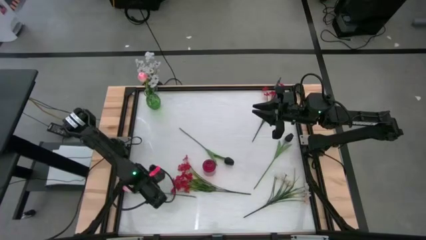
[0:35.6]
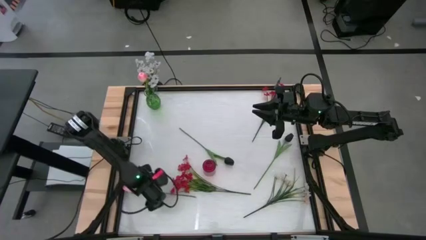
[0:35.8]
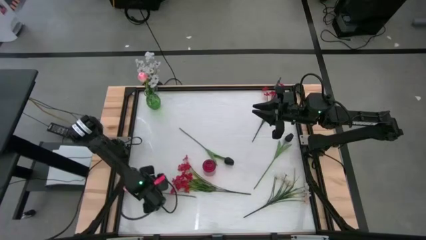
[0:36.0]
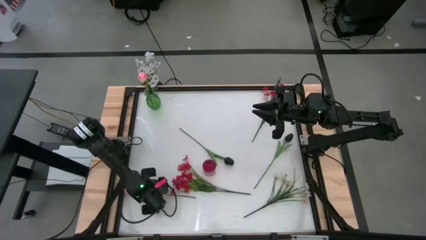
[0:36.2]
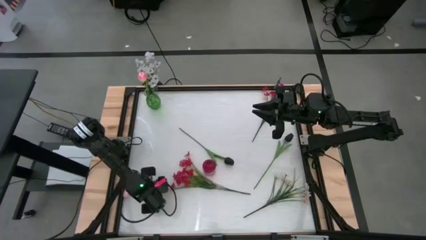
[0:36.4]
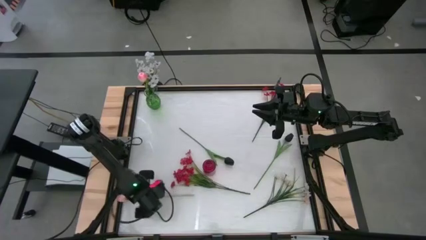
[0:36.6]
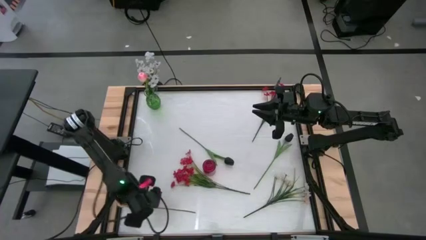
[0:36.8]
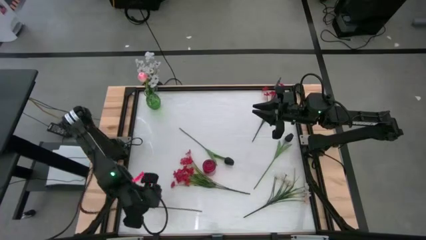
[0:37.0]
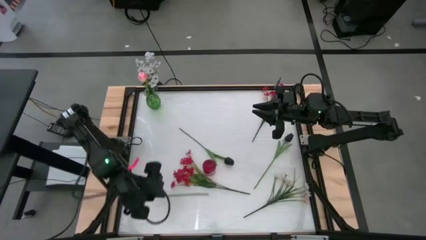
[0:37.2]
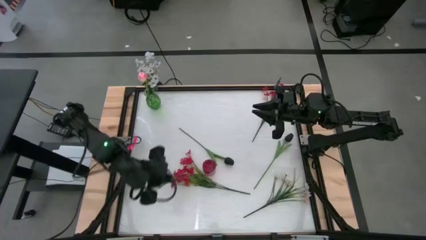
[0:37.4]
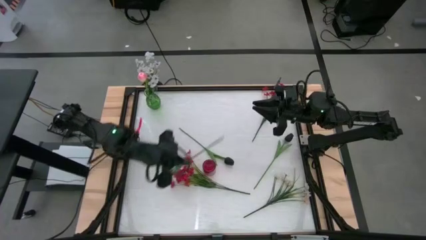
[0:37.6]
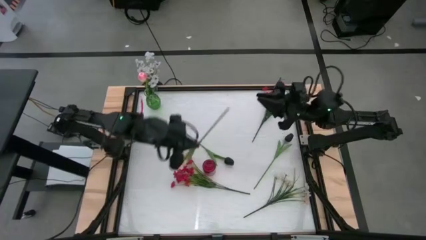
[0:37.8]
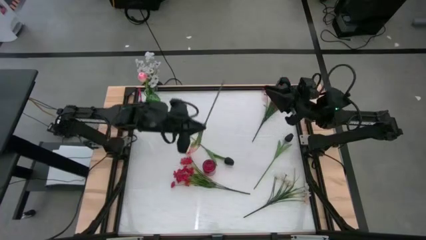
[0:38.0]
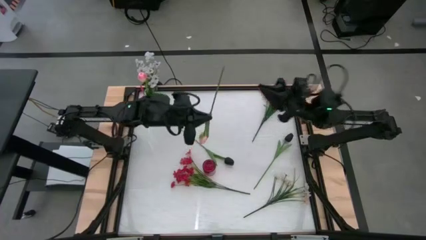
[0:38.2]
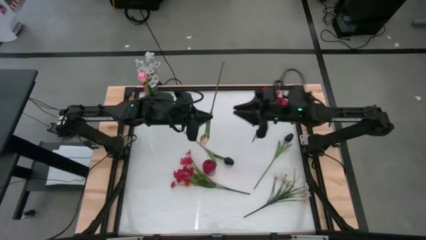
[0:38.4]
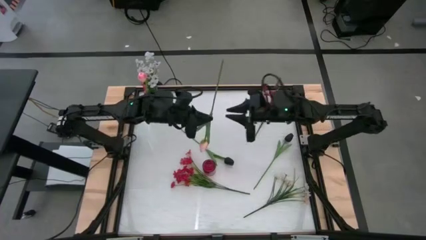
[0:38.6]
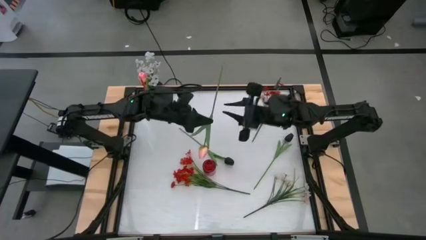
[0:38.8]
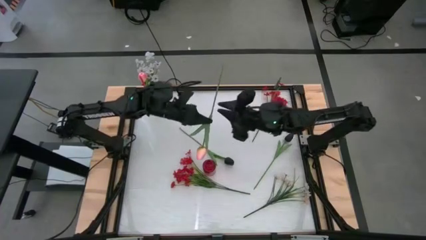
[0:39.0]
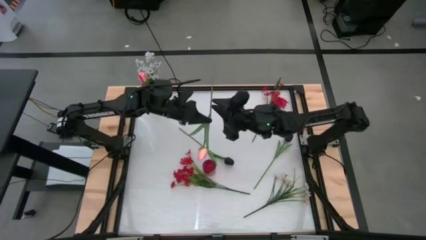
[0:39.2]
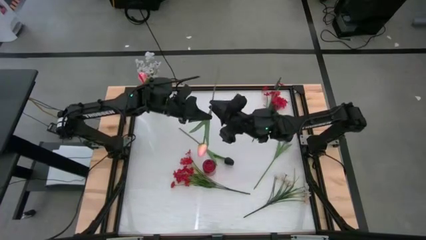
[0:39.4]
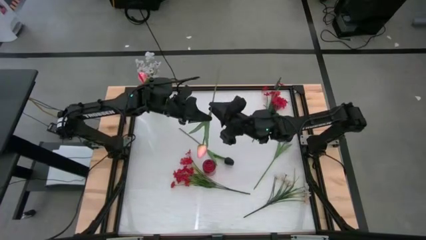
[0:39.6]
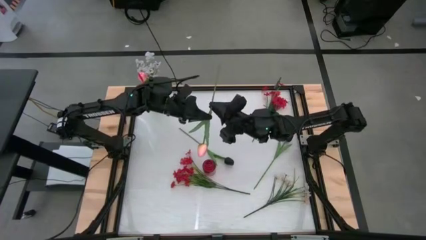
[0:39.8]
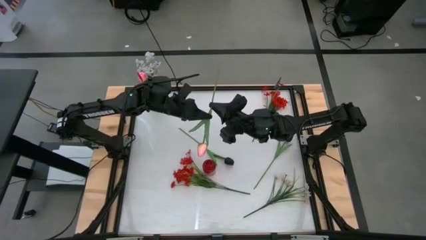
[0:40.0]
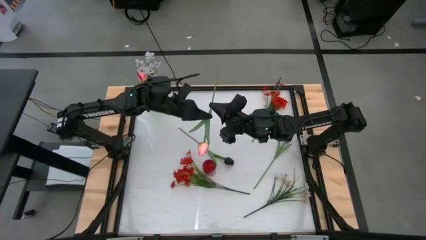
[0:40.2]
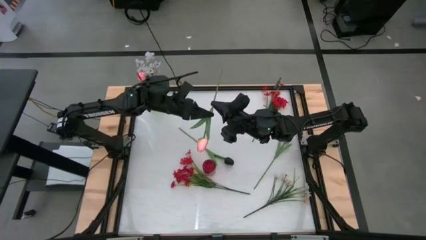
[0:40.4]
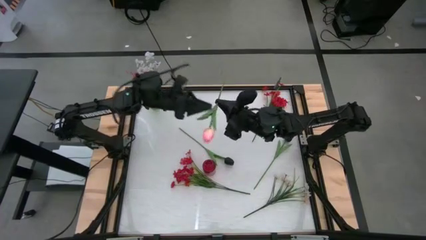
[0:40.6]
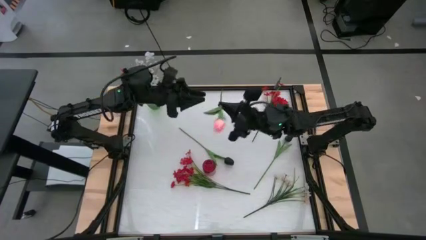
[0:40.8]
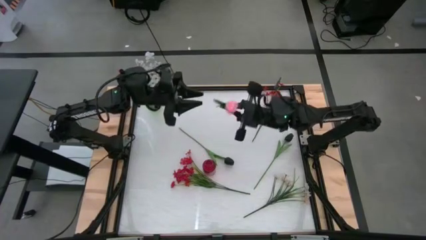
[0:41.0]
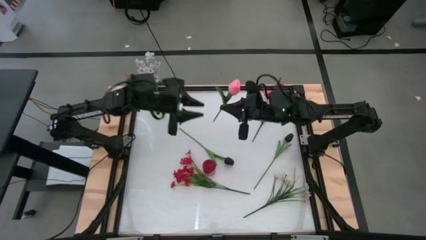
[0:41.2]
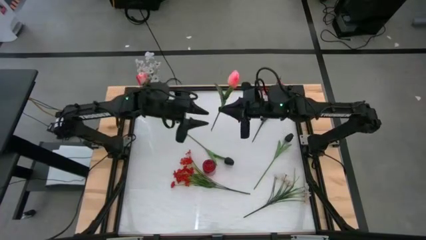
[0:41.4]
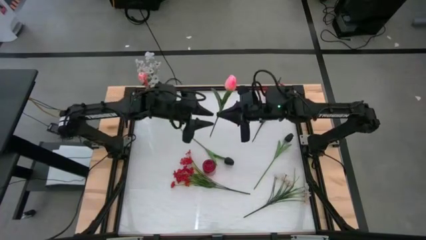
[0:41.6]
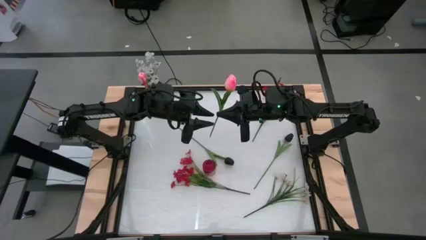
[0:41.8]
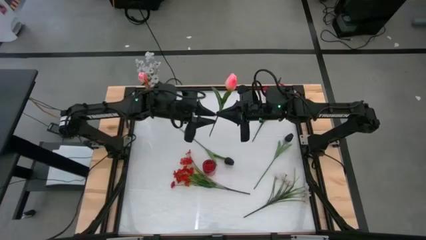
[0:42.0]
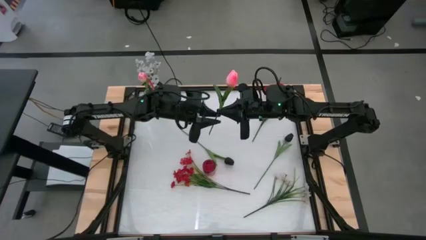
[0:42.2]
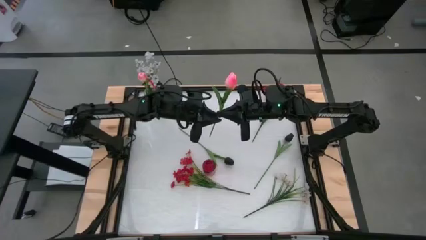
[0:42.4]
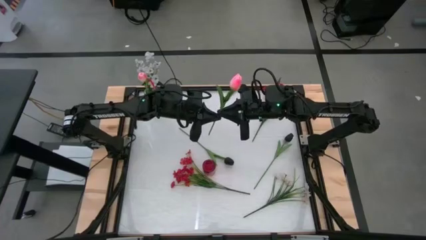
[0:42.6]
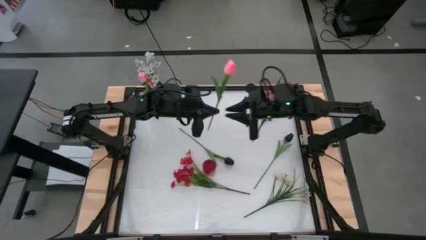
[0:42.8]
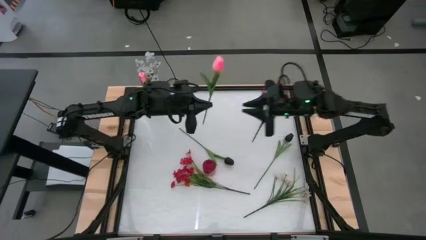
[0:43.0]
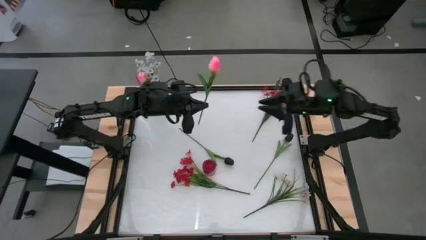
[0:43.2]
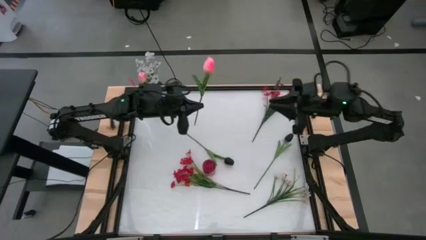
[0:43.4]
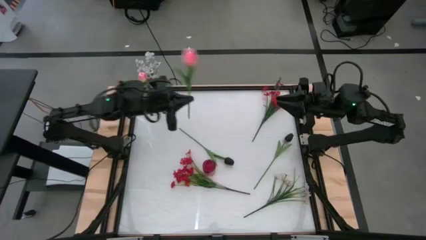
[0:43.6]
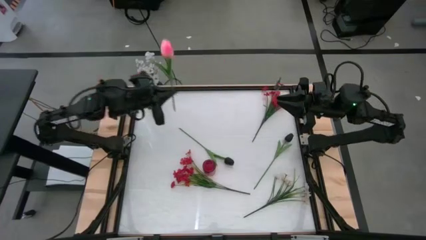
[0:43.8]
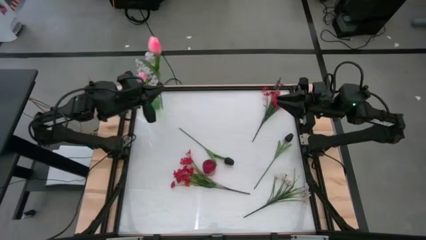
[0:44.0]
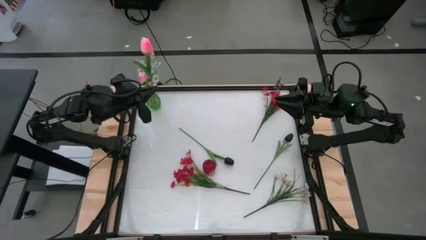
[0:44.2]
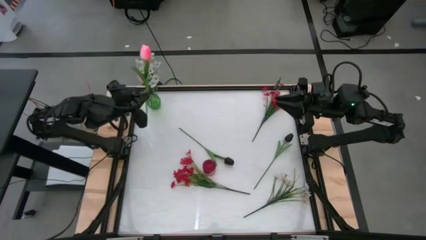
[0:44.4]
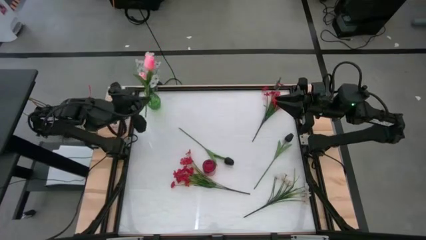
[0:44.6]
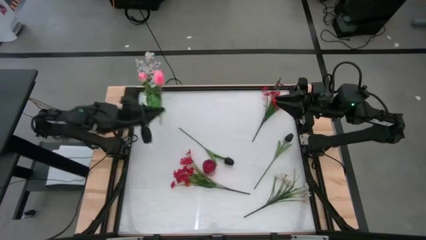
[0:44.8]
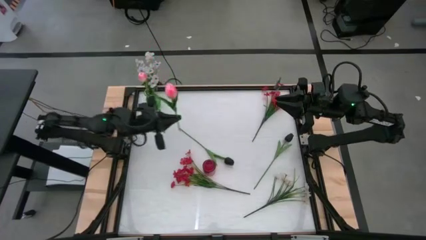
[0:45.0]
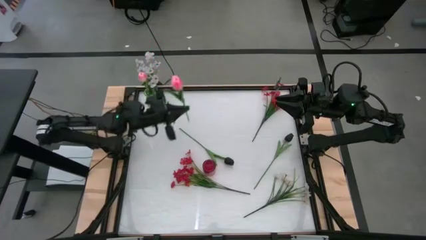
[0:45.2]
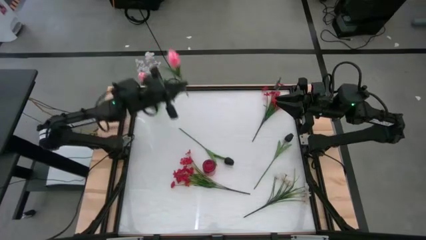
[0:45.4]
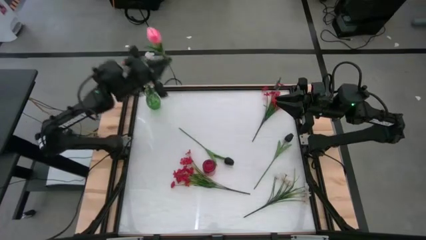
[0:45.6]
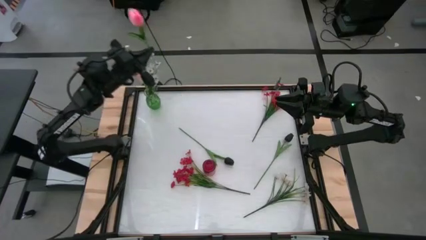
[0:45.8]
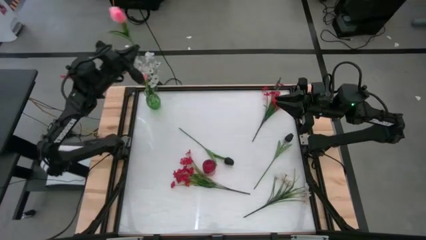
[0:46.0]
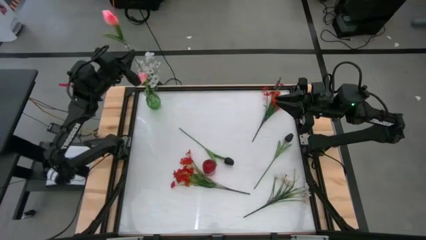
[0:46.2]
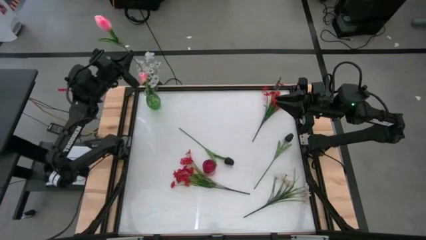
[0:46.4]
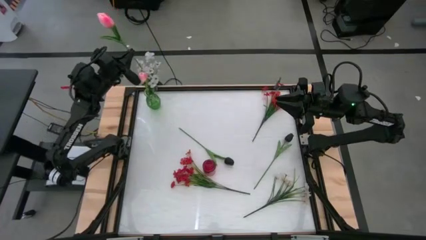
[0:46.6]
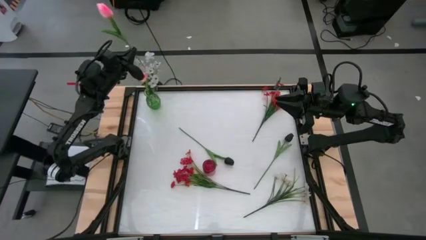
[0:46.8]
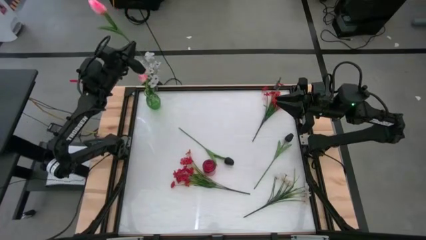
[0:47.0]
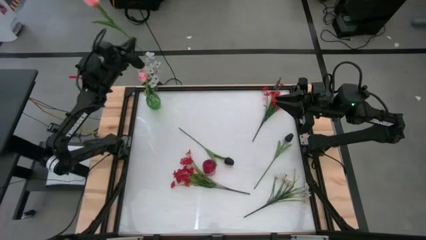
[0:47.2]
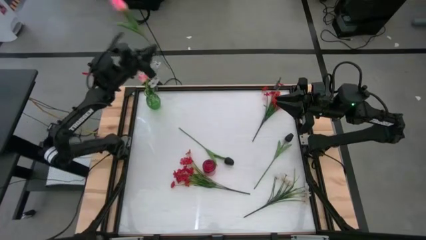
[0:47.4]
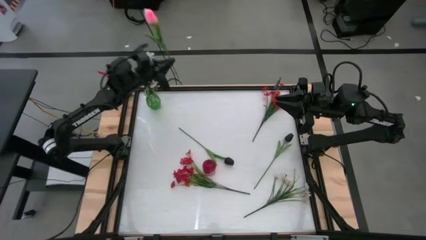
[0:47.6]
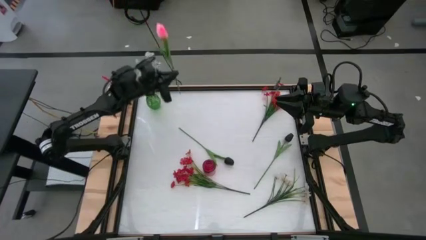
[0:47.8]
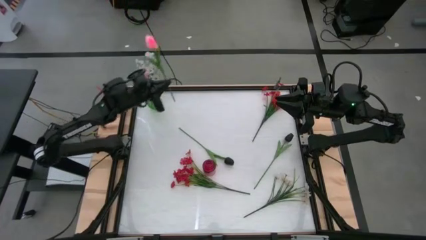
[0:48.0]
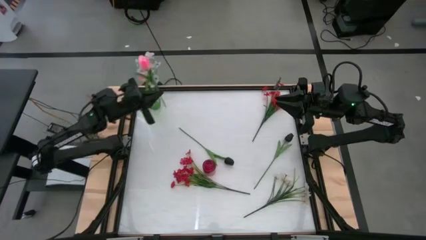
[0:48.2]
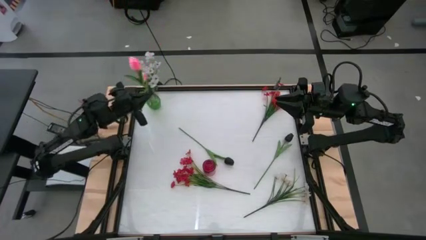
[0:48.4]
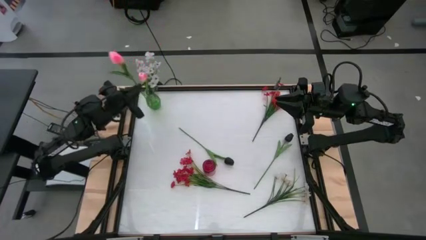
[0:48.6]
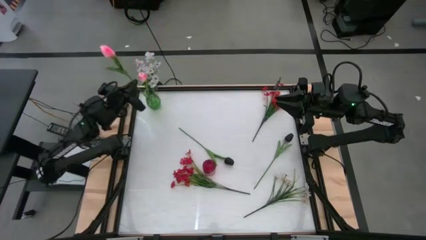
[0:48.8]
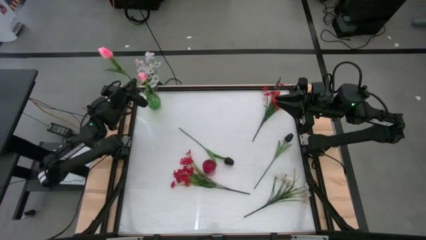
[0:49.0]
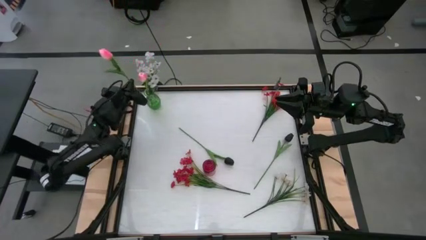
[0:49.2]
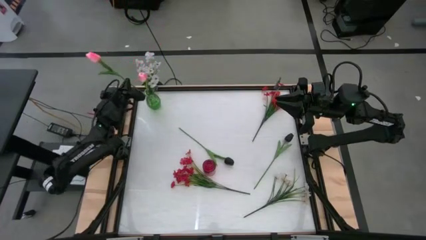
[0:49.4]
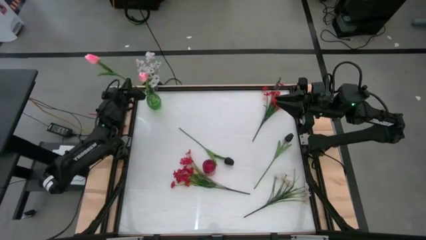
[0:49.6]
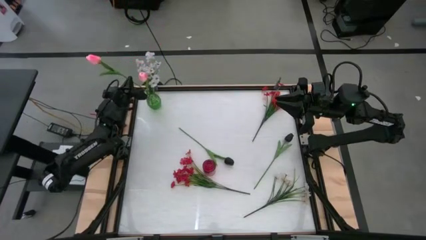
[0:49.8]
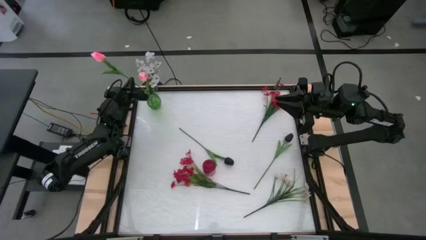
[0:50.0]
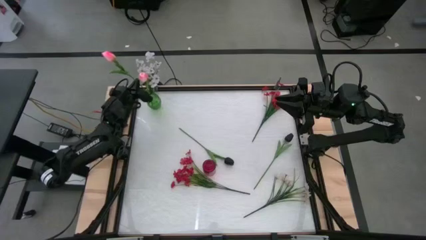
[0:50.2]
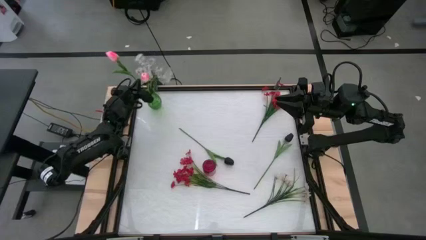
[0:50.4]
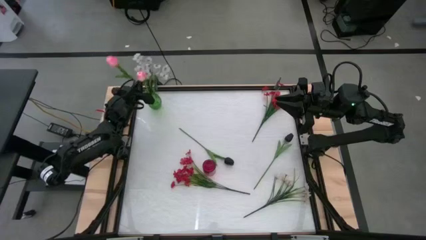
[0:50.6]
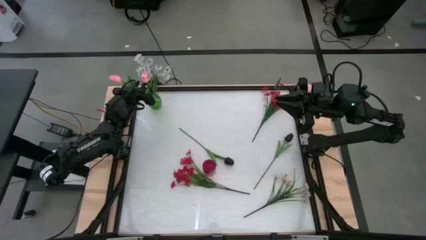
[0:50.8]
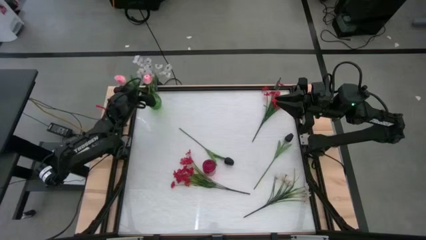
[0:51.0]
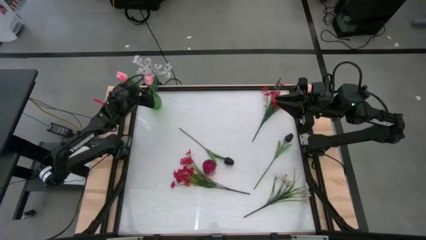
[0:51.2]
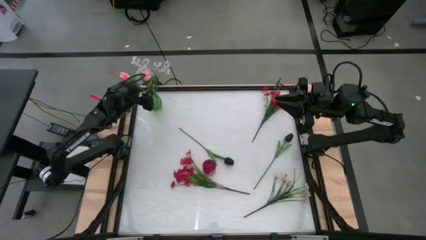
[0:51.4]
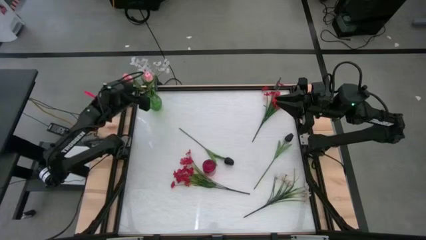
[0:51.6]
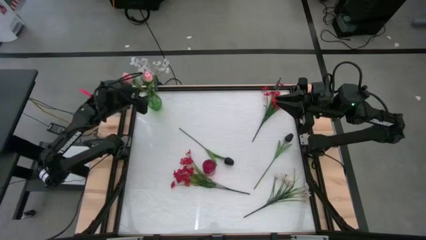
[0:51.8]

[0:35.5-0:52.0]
Task: Sort flowers into vase by color
Put the pink flowers into the green flower vase
